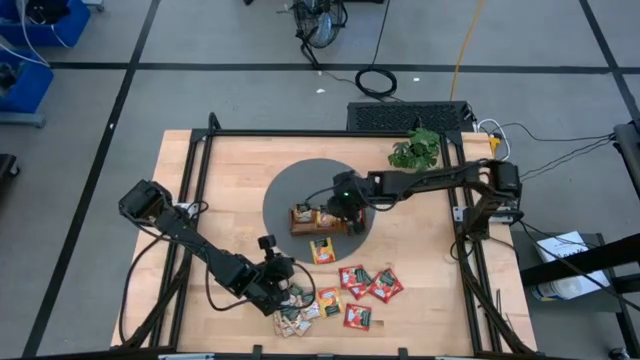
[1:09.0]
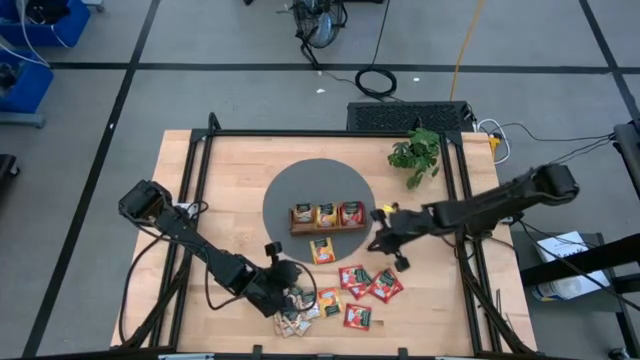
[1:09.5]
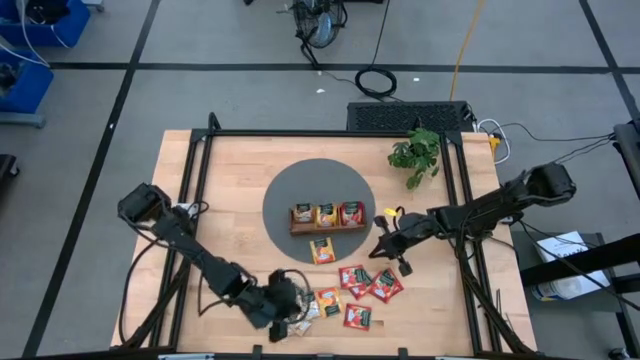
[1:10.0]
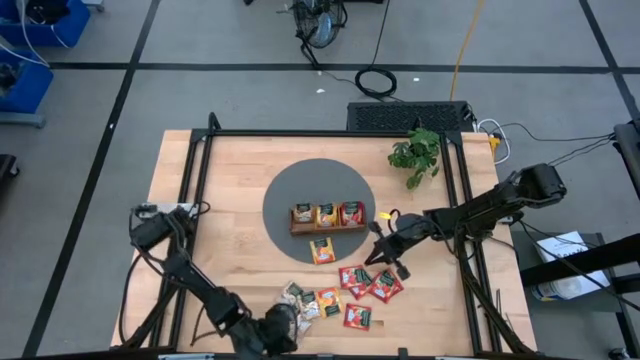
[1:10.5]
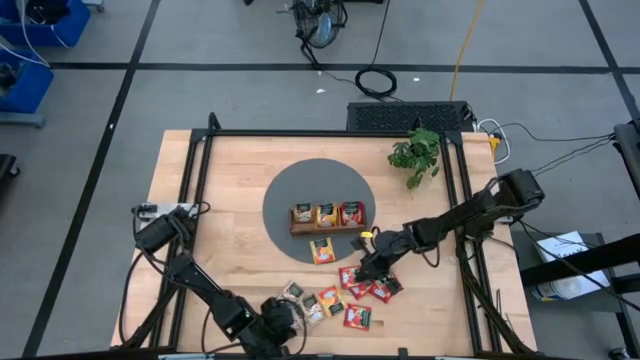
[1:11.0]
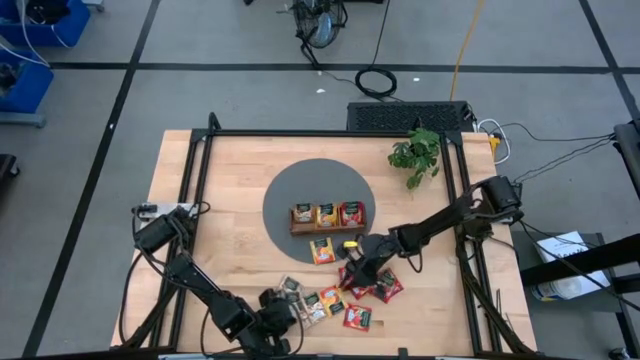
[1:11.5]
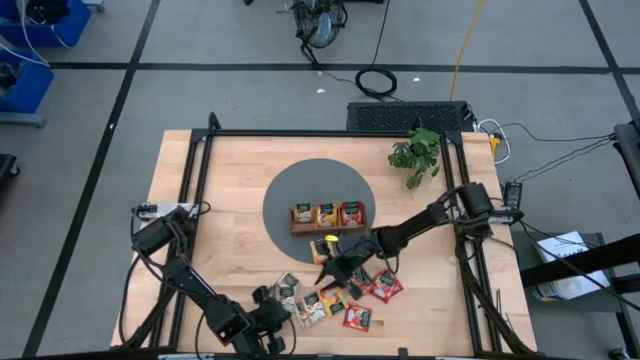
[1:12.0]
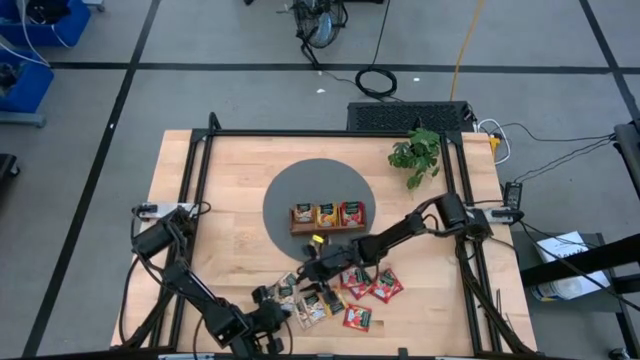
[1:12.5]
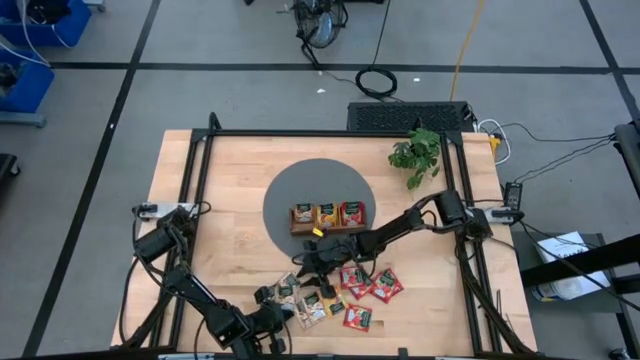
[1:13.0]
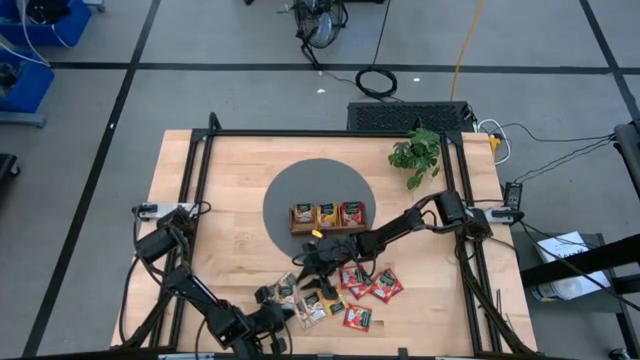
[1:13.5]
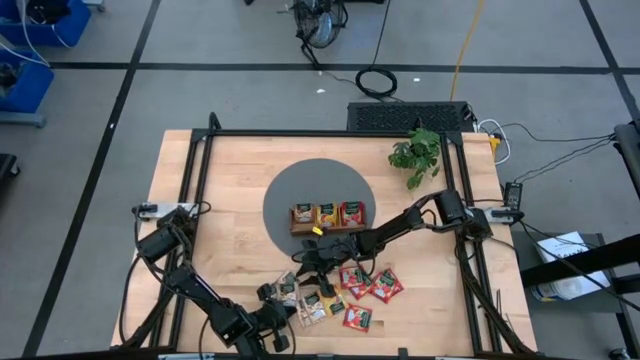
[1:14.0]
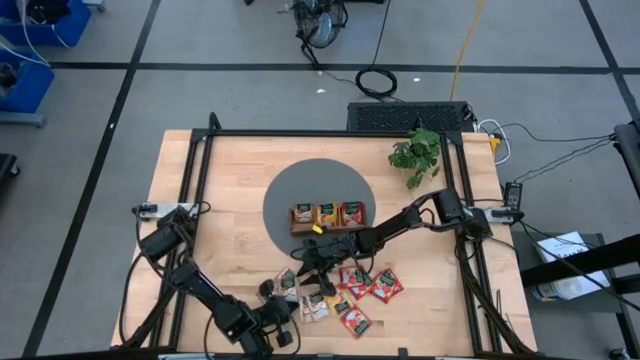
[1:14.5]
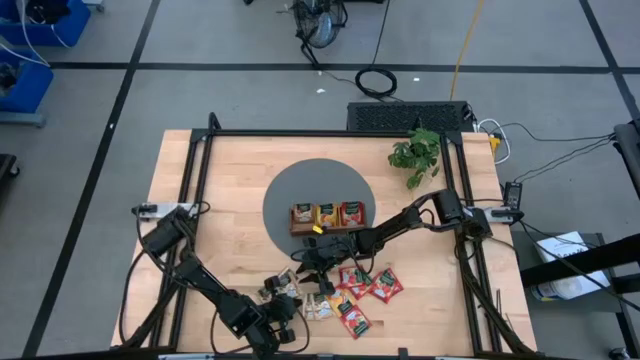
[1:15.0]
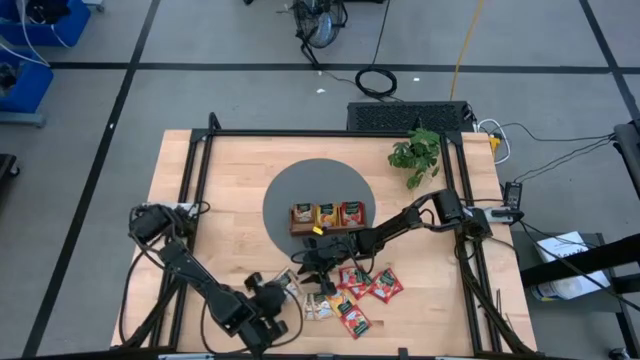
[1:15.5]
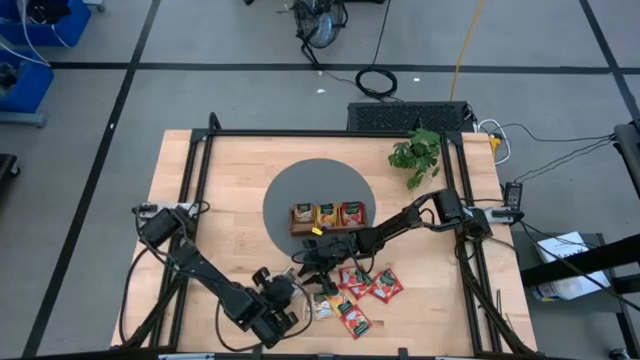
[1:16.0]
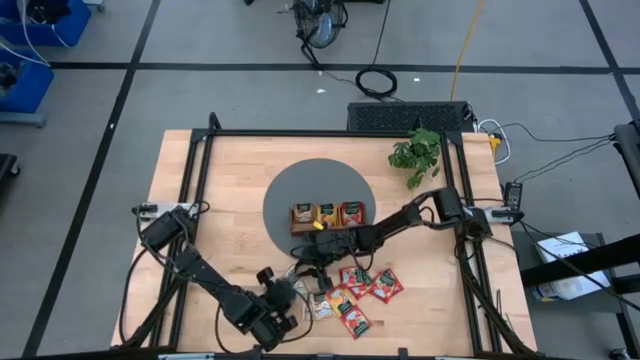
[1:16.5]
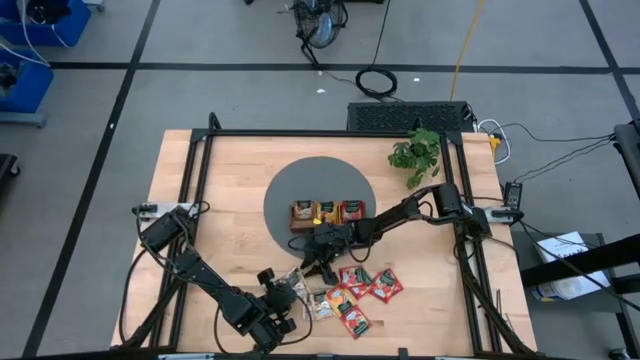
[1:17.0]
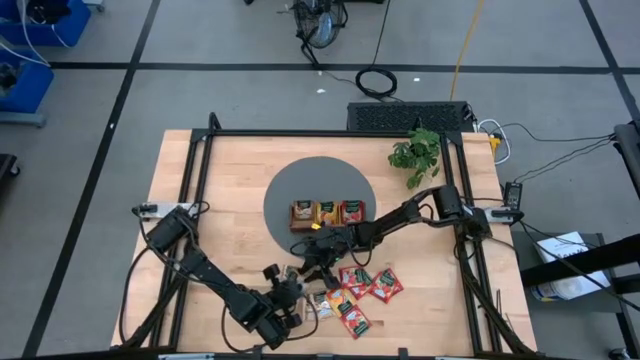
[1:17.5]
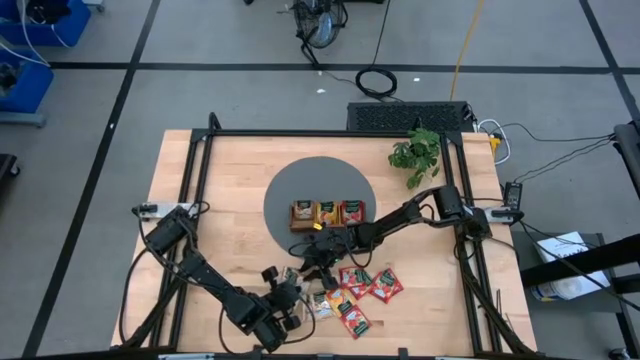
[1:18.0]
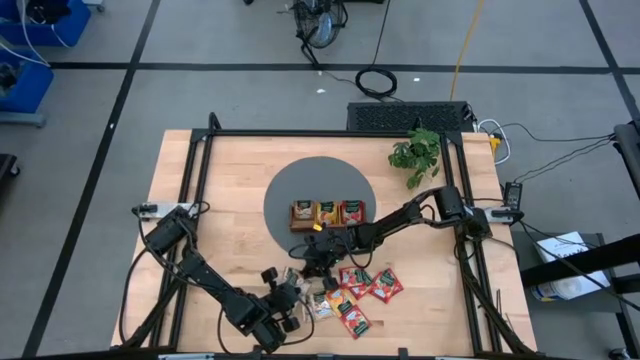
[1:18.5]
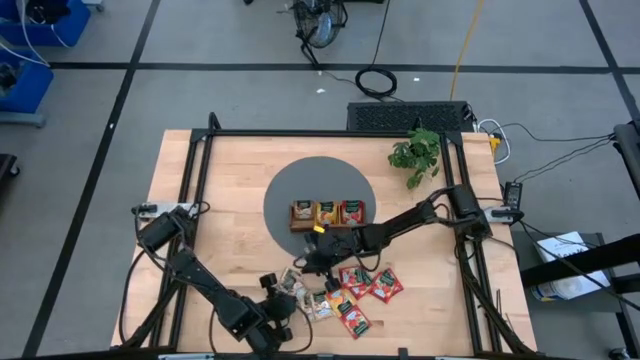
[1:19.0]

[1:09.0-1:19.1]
Task: Pick & Place Tea
Put the cinnamon tea sachet into the left compartment of the wooden organizer

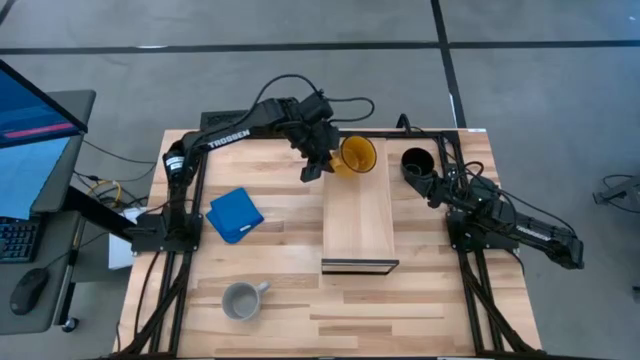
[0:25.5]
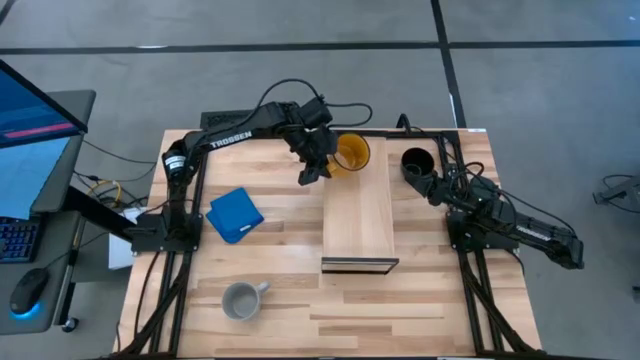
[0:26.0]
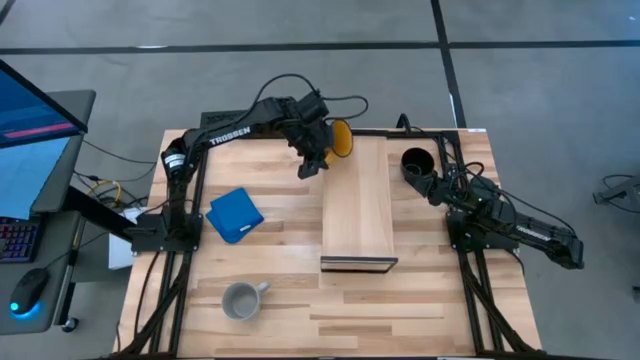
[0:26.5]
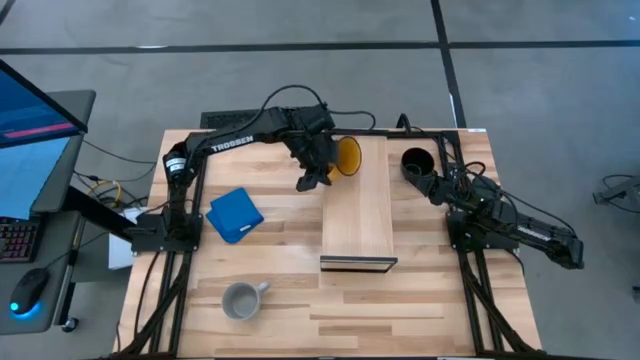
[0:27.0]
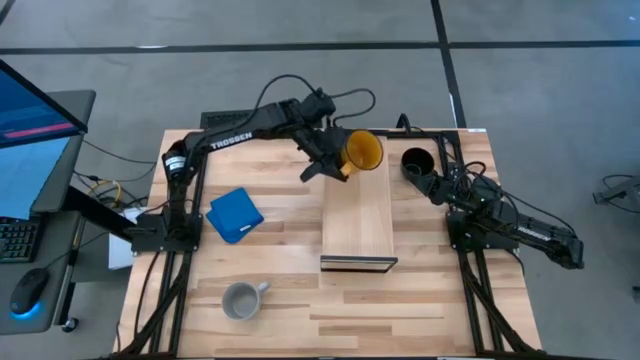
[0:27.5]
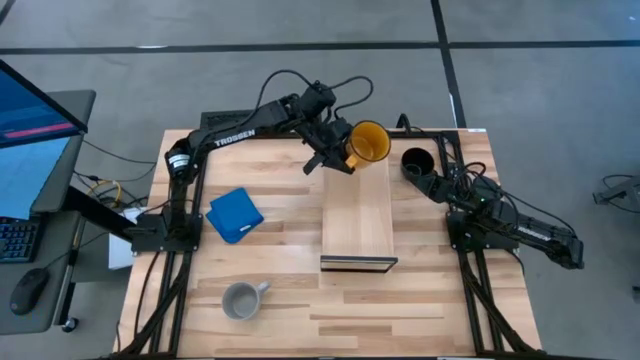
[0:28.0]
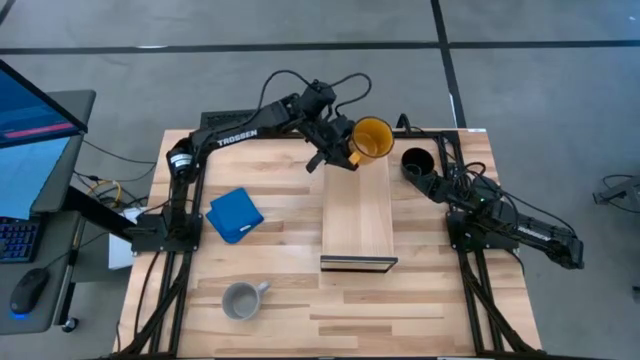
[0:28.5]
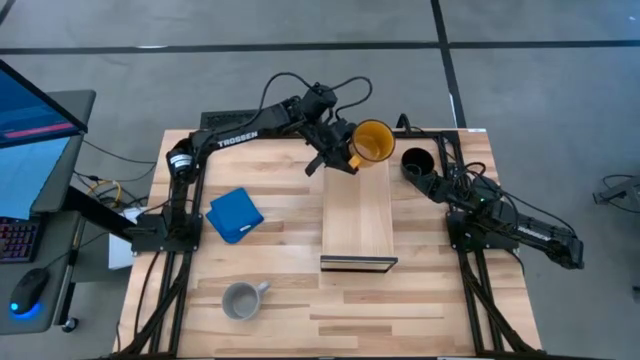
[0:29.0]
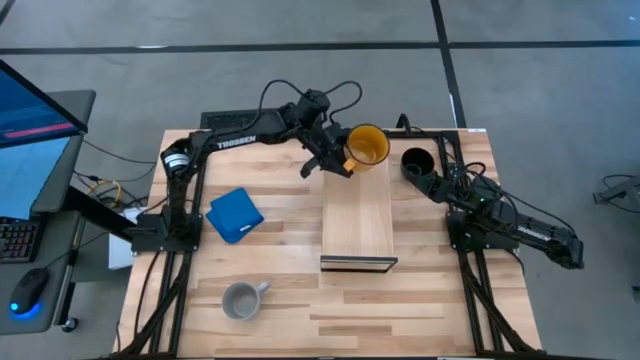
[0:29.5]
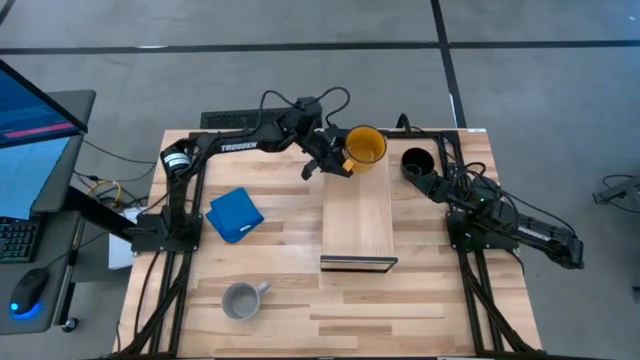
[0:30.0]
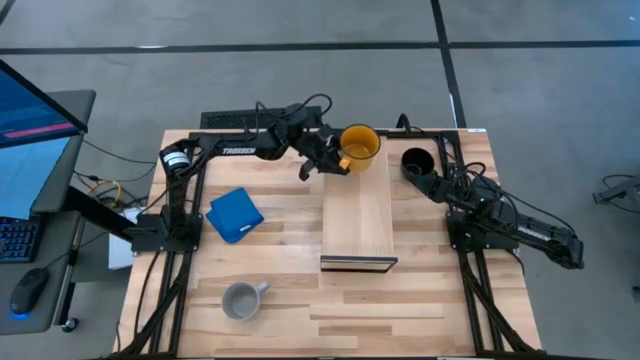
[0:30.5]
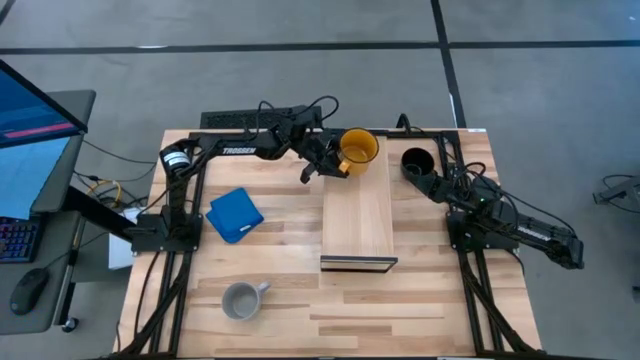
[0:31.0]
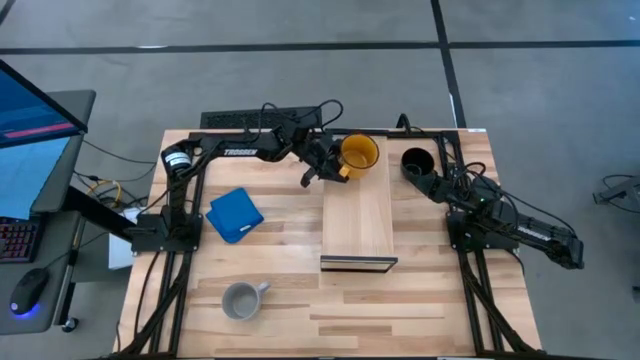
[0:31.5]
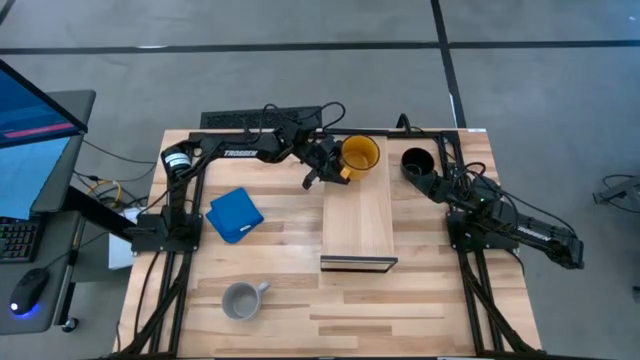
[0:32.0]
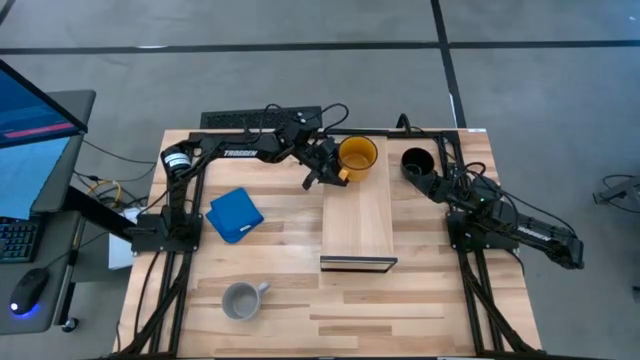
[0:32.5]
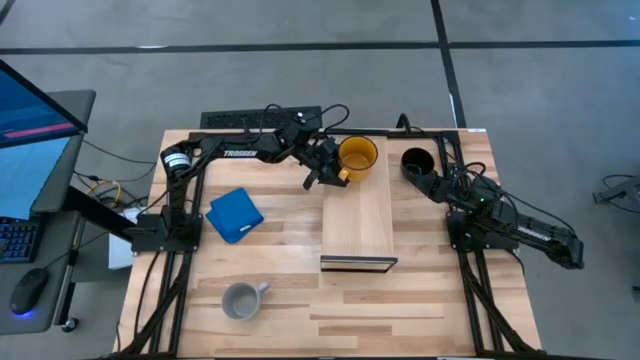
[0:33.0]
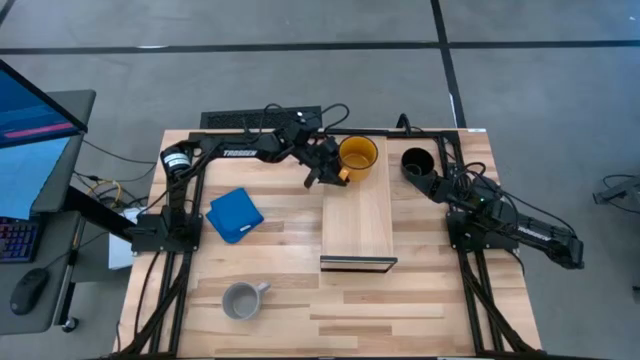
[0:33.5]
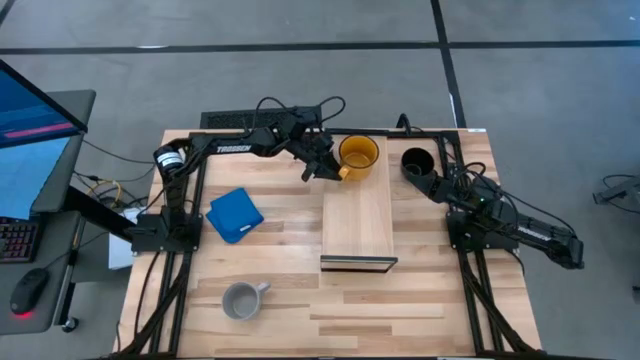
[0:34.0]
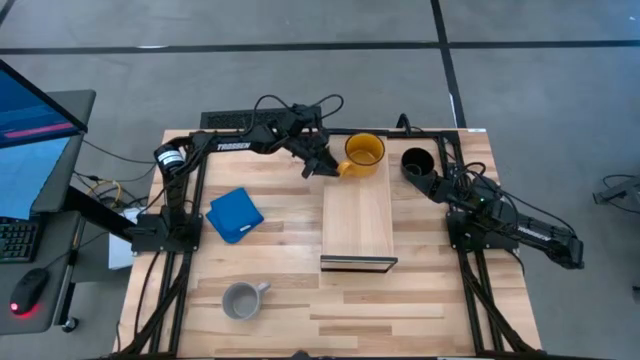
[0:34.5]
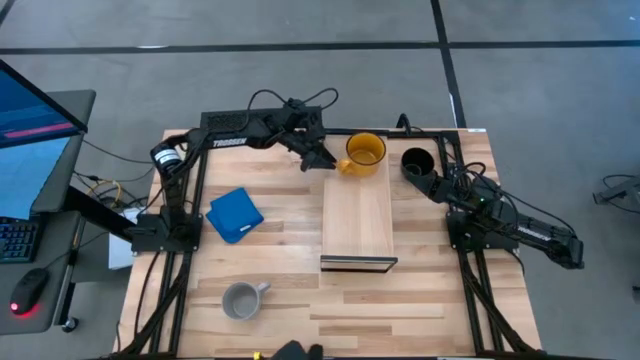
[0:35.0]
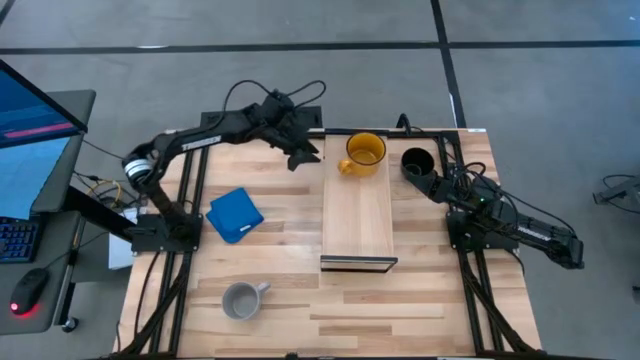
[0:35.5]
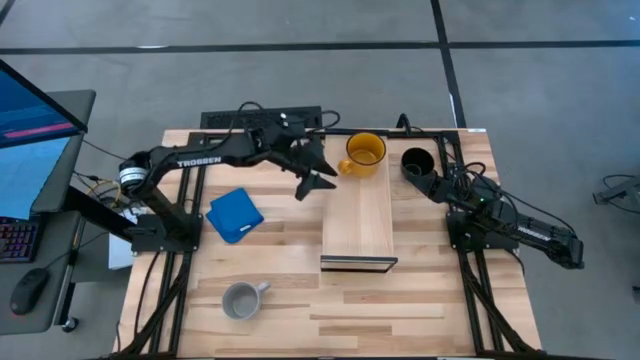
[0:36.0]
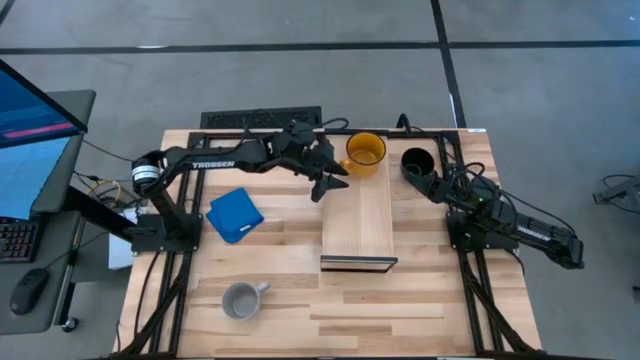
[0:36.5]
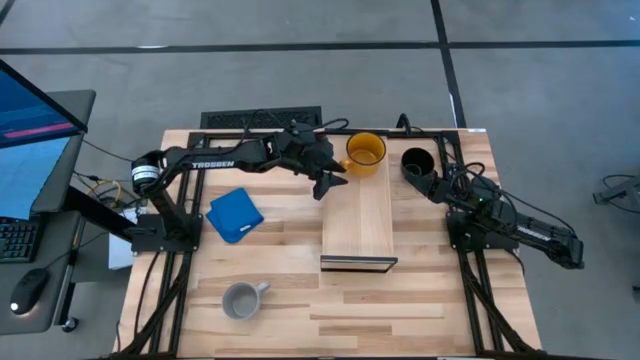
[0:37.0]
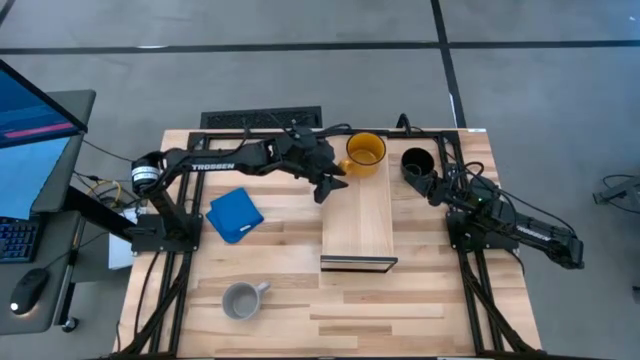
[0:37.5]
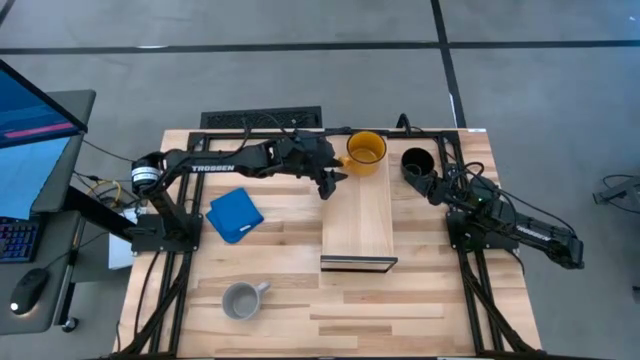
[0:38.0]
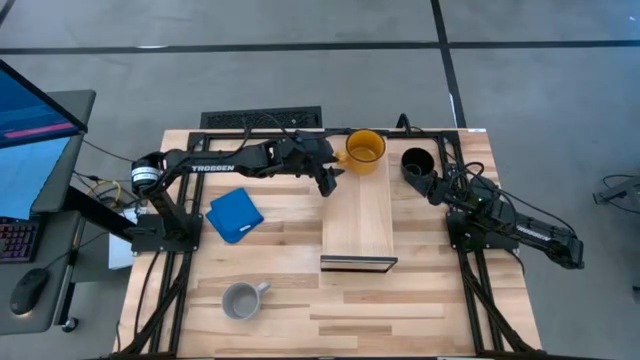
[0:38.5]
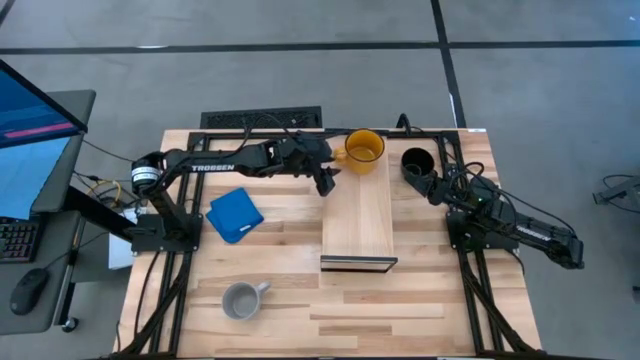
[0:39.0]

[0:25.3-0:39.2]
Task: Stack small to large cups/mugs on shelf
Put the yellow mug on the shelf
